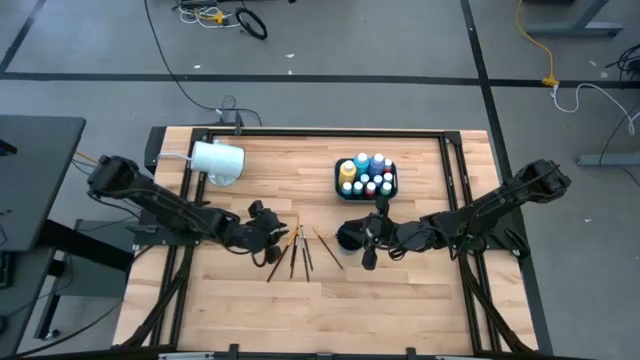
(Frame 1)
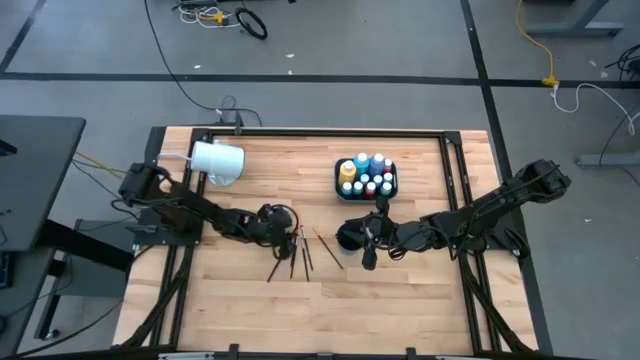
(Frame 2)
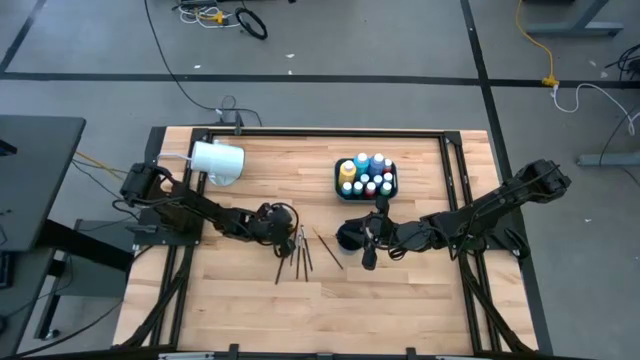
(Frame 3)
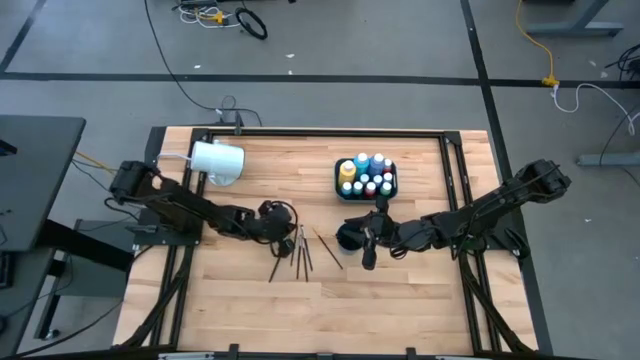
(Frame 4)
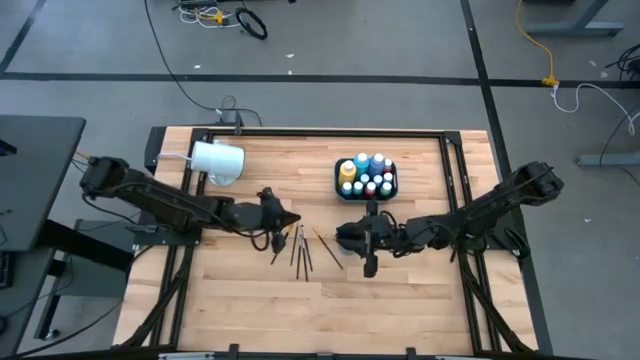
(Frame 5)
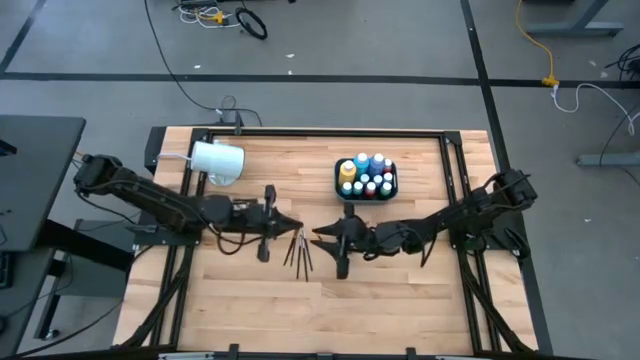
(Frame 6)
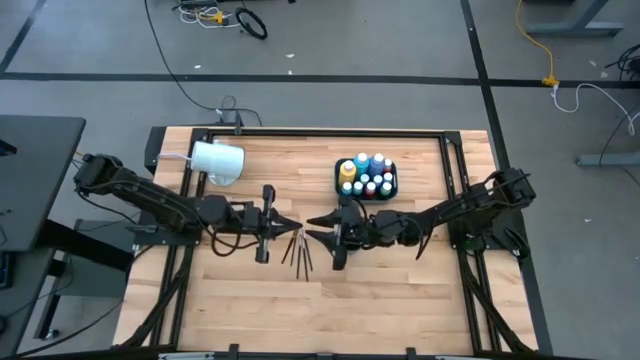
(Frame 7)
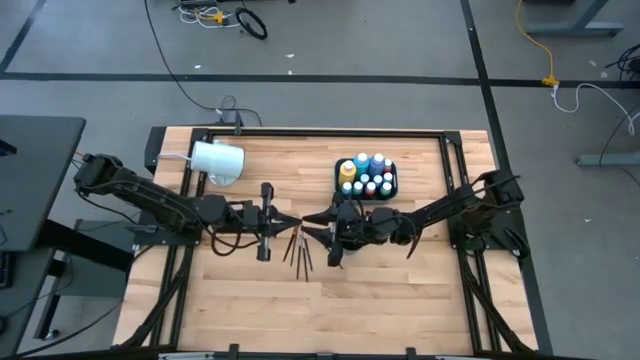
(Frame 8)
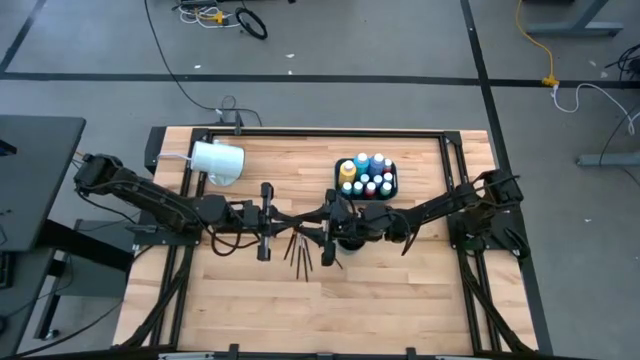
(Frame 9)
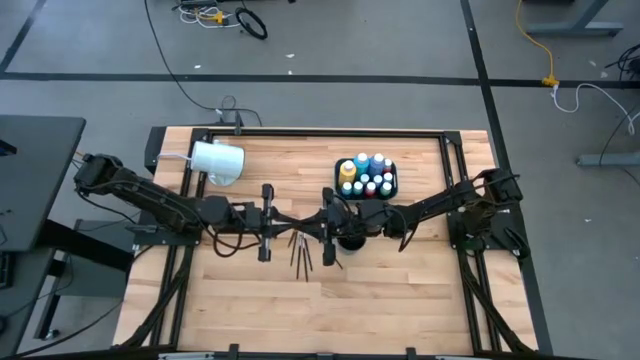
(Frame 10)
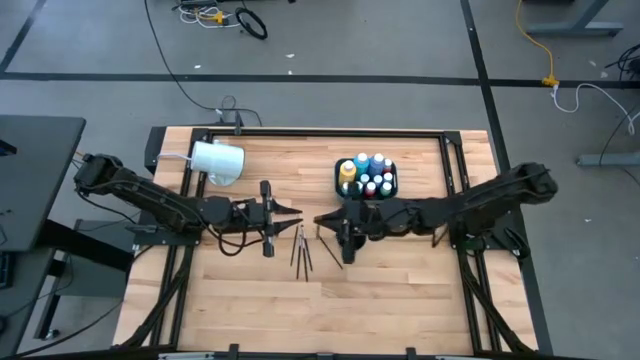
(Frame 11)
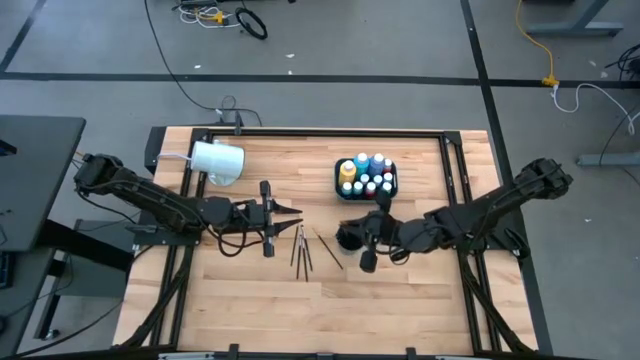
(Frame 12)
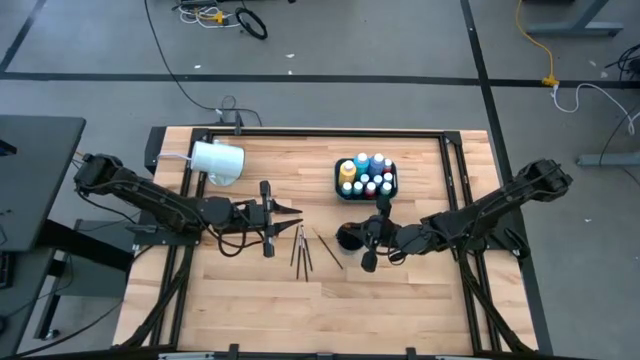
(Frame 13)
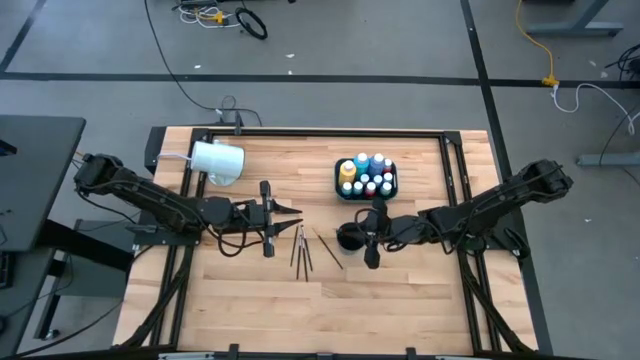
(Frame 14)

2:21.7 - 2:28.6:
Task: Pick & Place Paint Supplies
Put the left gold paint brush into the cup

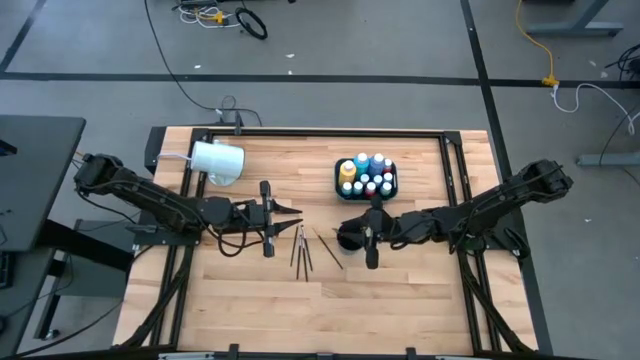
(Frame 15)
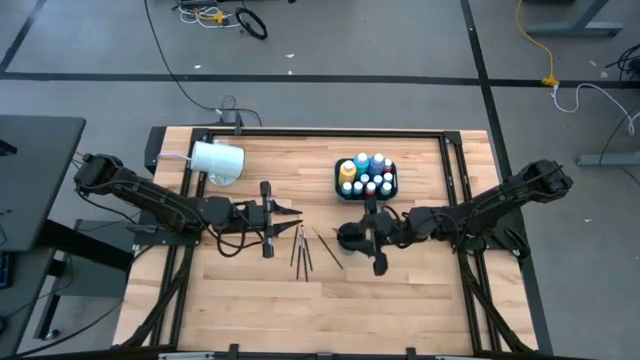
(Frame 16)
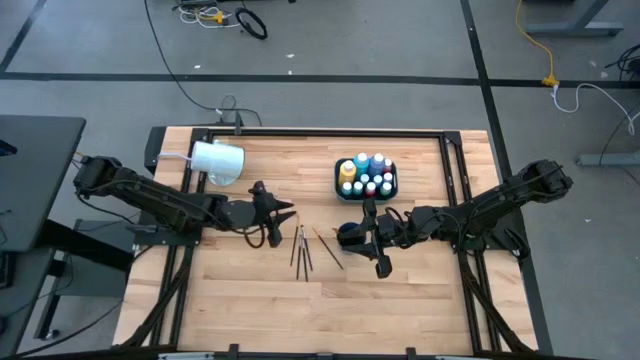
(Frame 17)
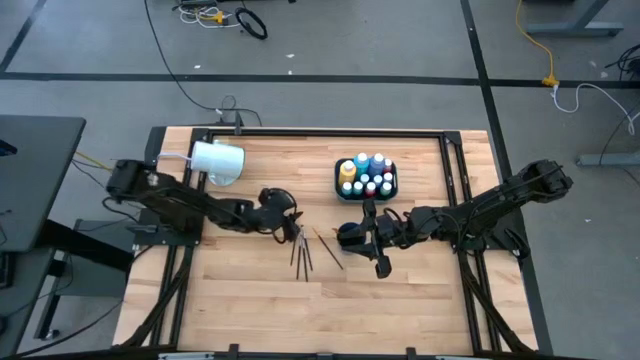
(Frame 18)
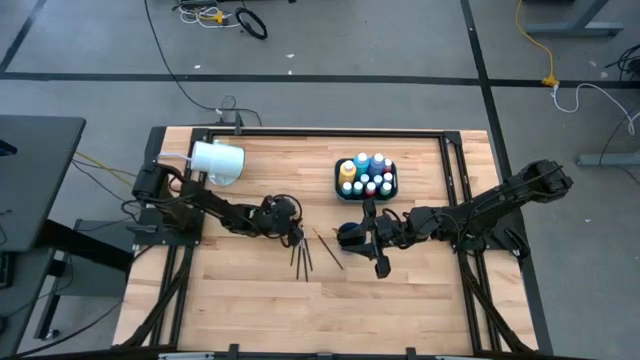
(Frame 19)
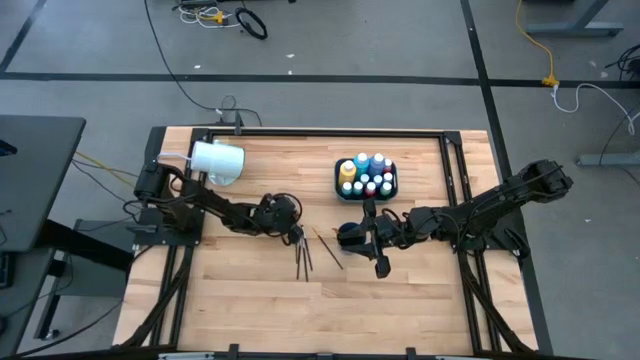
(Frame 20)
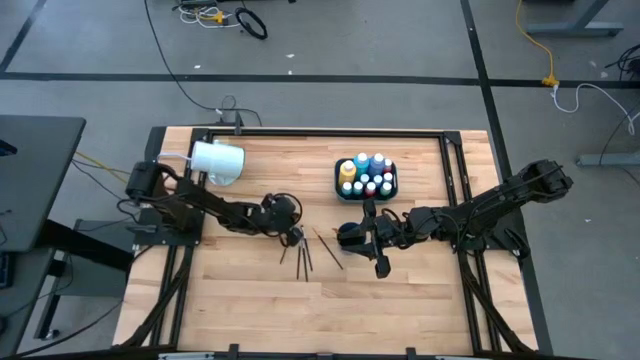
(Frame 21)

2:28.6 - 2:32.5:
Put the left gold paint brush into the cup

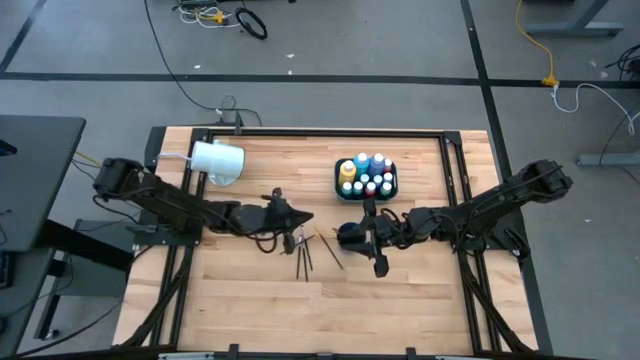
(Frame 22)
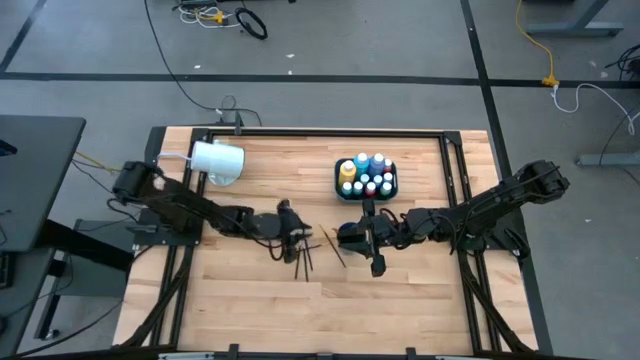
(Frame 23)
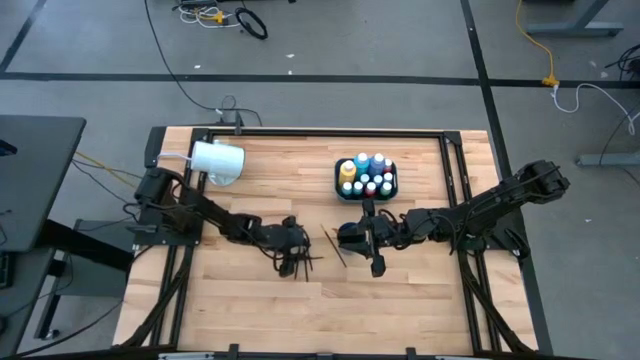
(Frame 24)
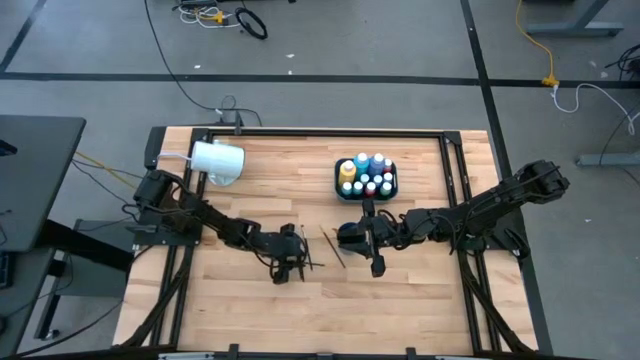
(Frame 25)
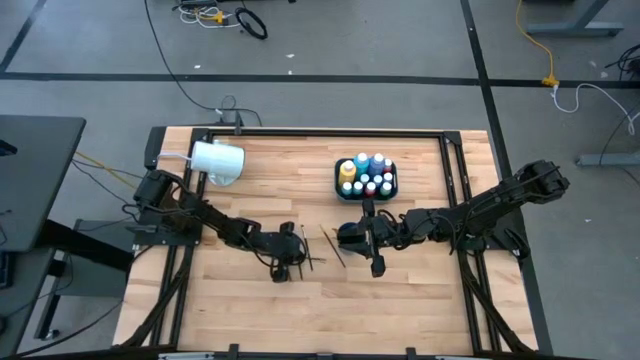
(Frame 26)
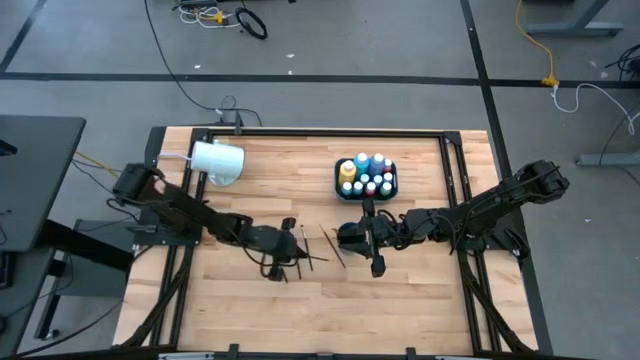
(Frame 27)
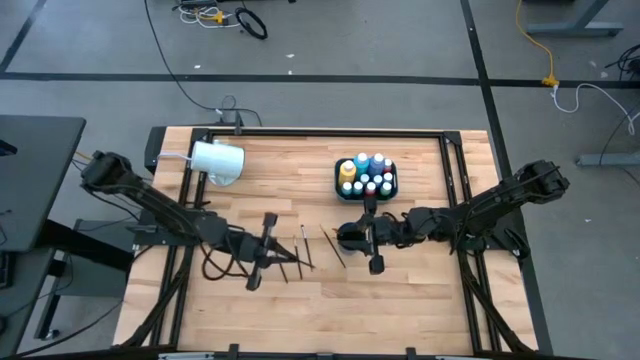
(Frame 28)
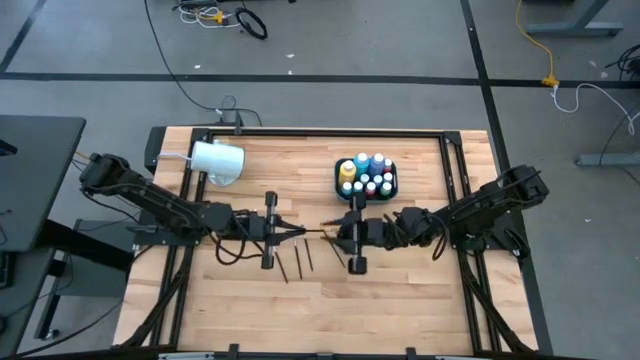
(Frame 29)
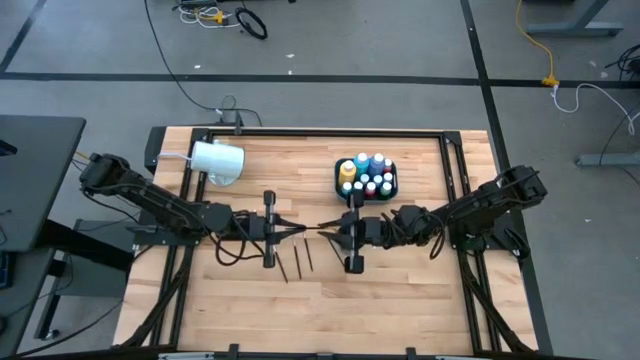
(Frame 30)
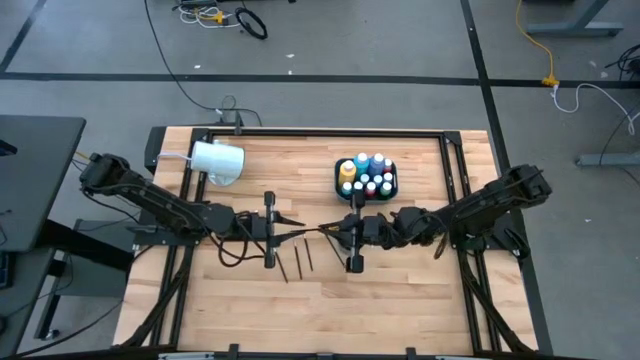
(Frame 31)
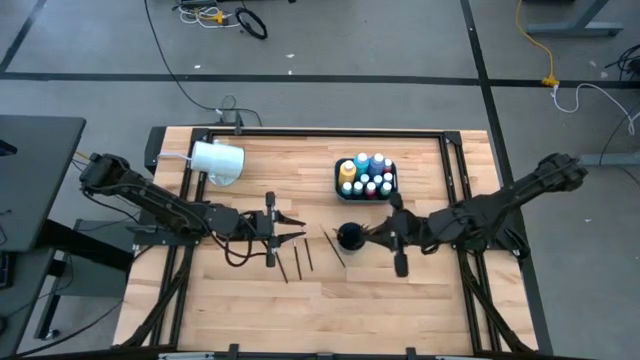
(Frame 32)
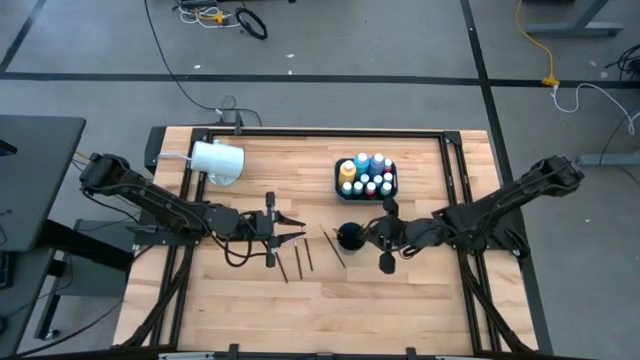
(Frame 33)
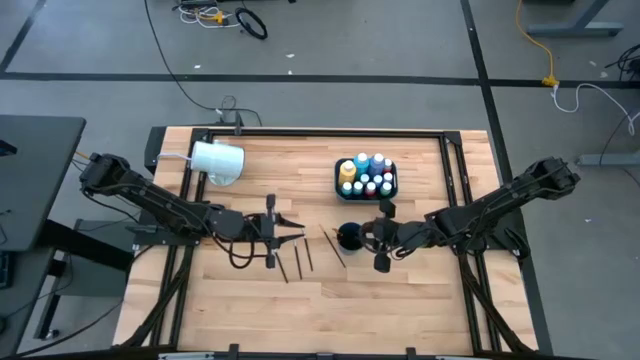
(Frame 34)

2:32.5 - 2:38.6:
Put the left gold paint brush into the cup

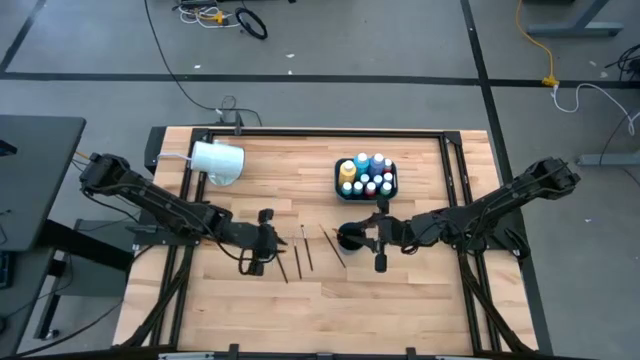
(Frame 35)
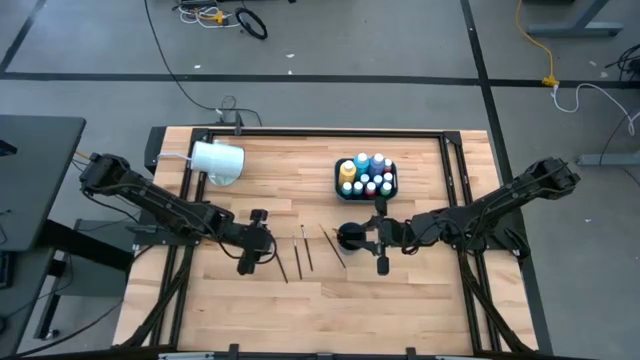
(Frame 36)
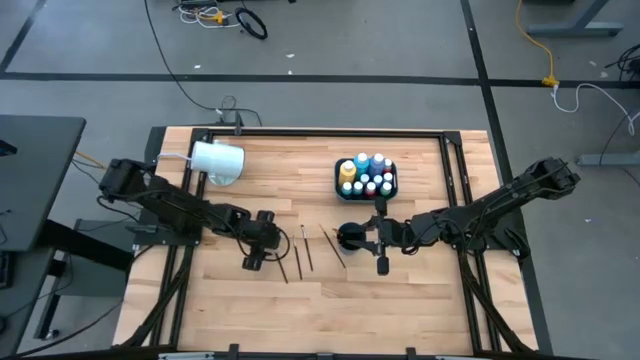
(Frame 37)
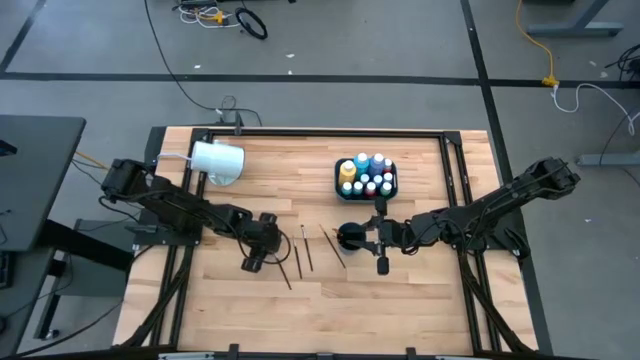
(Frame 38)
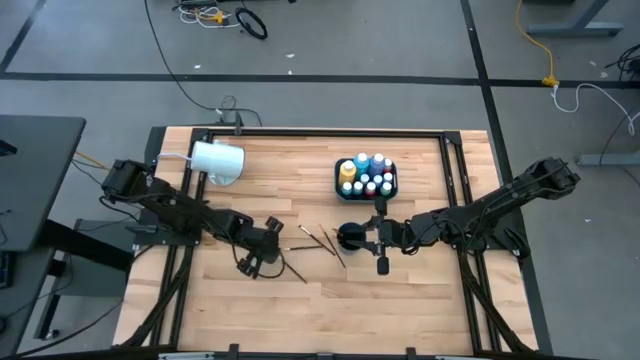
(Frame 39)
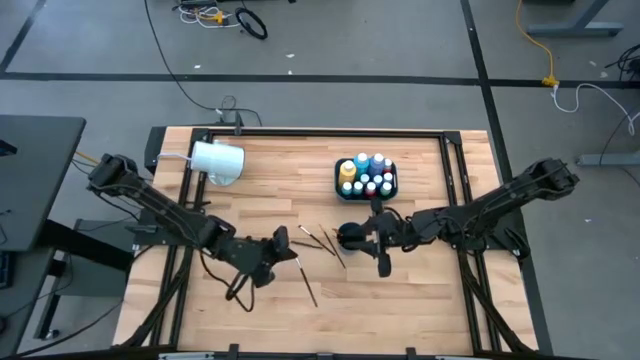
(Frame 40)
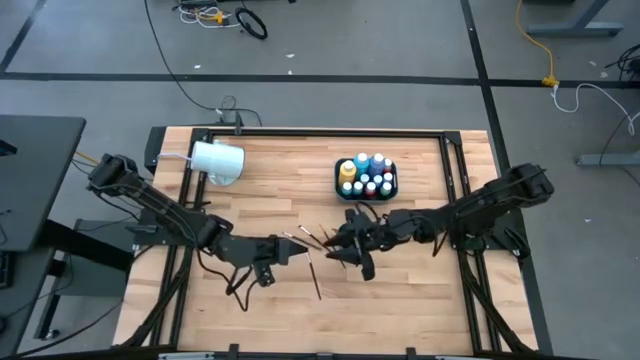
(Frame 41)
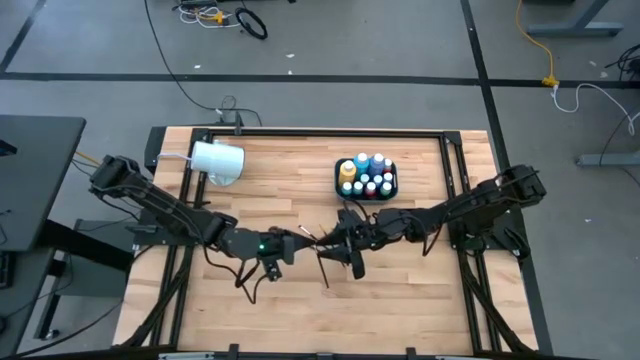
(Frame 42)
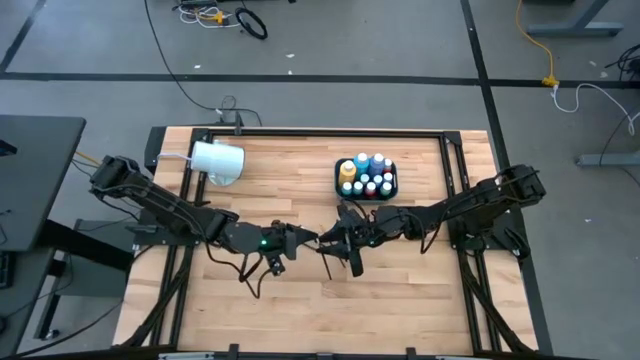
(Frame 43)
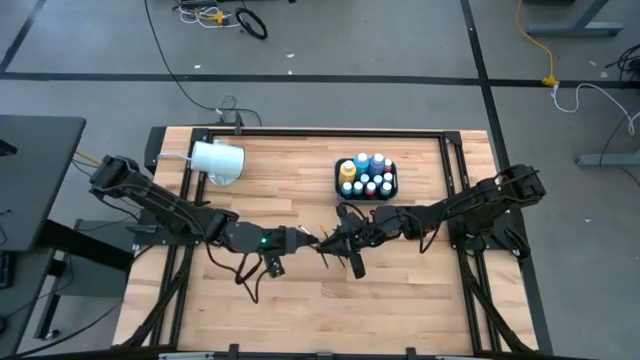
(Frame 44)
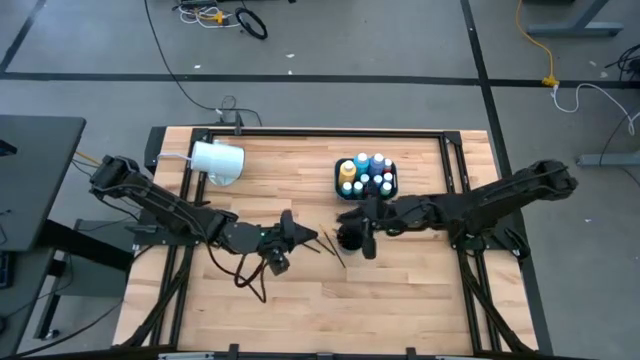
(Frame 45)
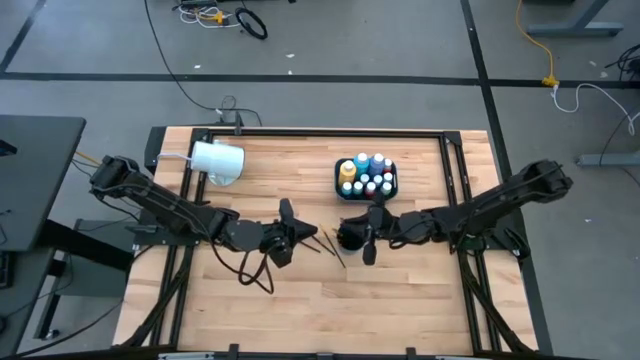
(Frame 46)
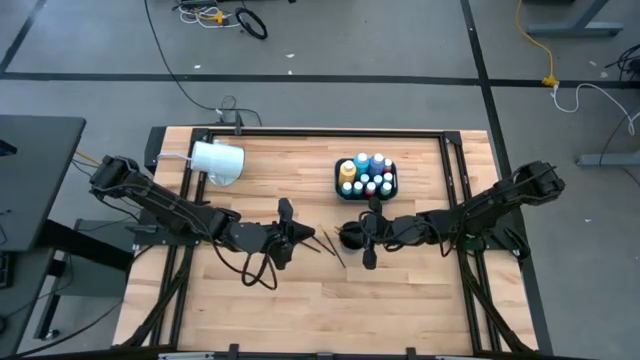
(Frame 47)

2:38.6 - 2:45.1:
Put the left silver paint brush into the cup
